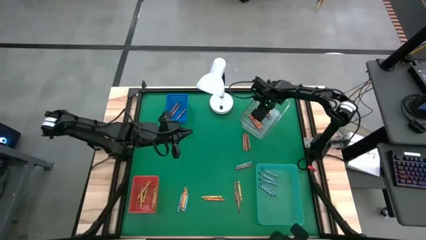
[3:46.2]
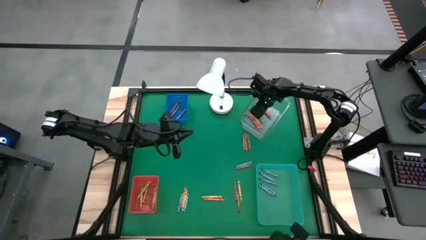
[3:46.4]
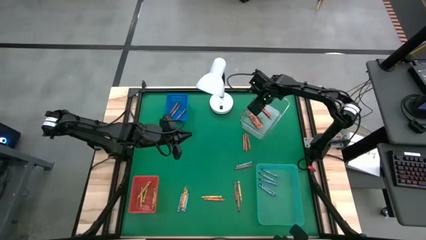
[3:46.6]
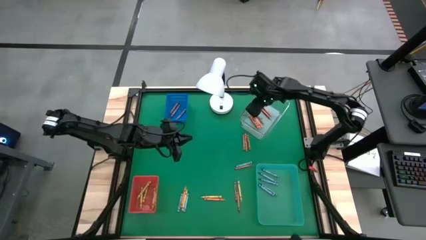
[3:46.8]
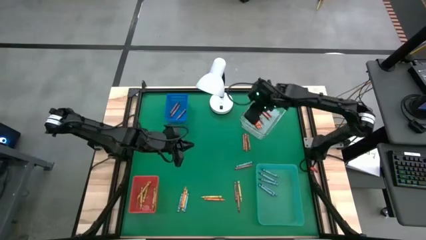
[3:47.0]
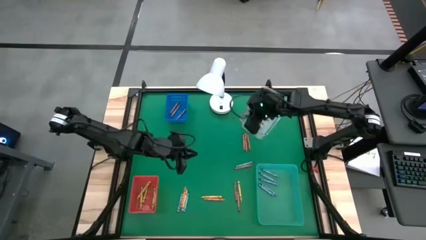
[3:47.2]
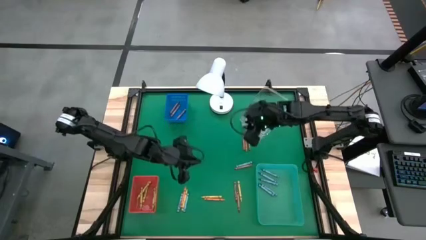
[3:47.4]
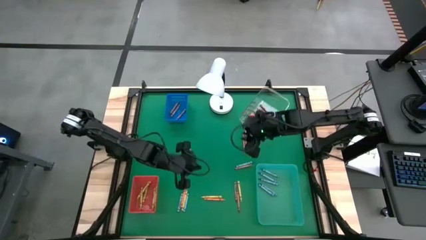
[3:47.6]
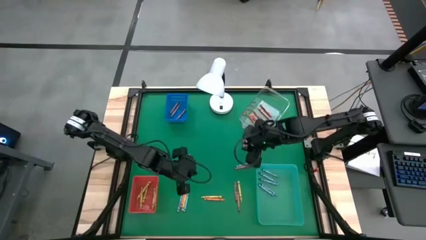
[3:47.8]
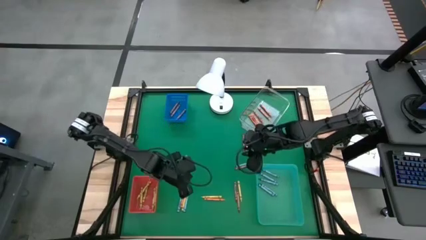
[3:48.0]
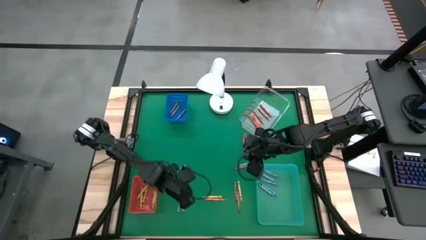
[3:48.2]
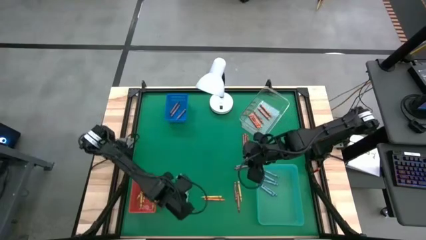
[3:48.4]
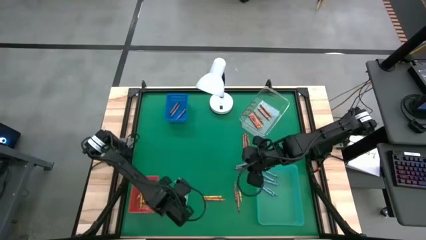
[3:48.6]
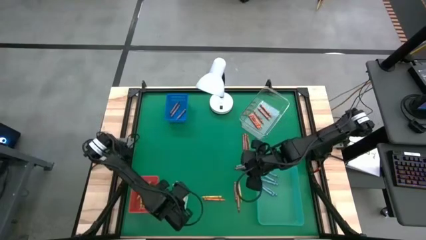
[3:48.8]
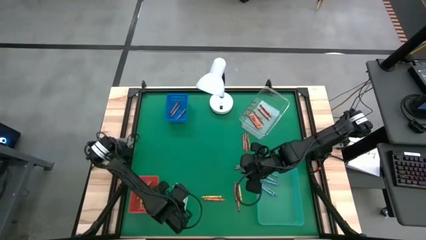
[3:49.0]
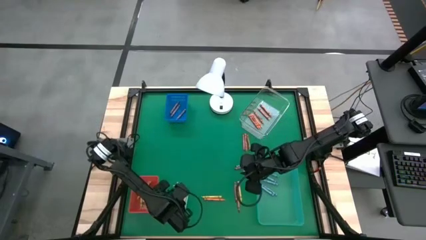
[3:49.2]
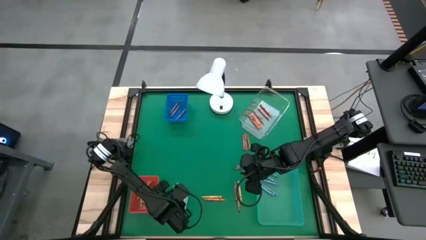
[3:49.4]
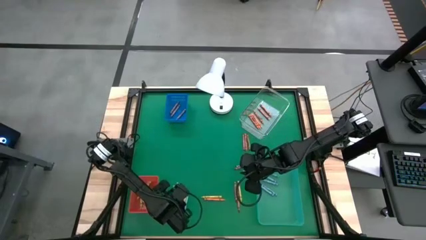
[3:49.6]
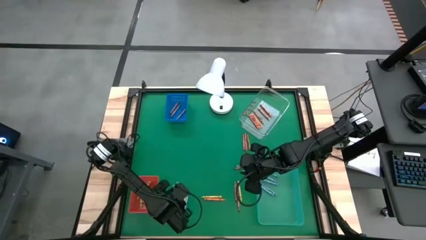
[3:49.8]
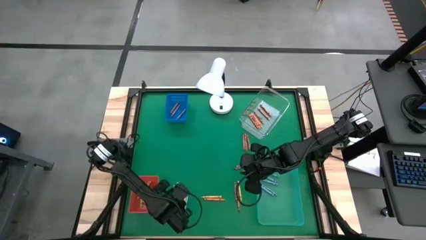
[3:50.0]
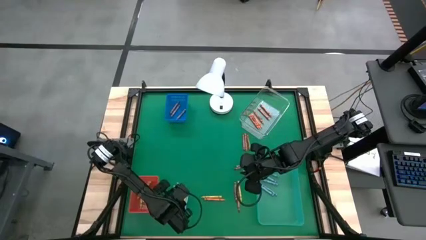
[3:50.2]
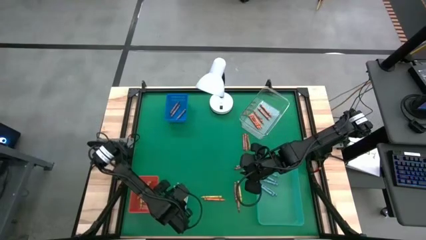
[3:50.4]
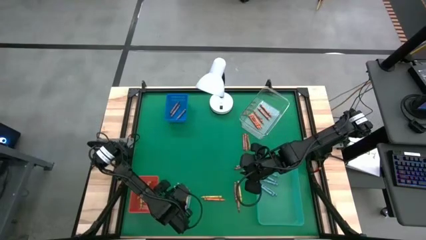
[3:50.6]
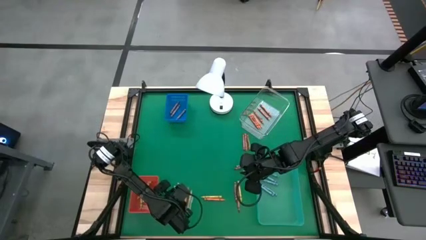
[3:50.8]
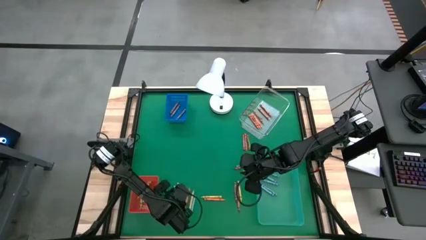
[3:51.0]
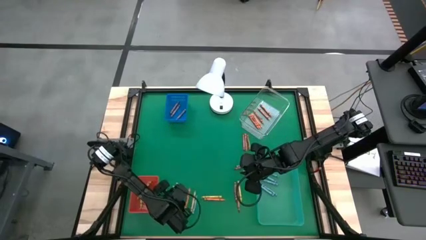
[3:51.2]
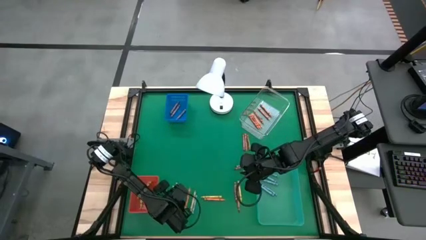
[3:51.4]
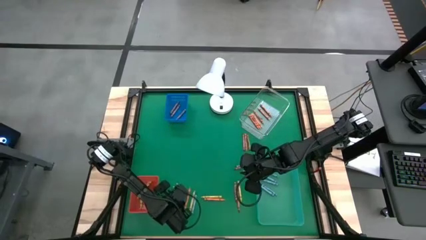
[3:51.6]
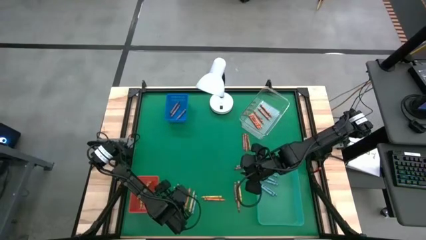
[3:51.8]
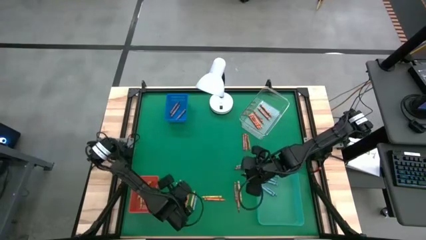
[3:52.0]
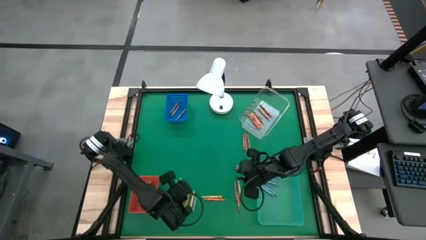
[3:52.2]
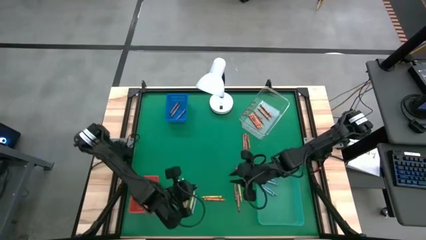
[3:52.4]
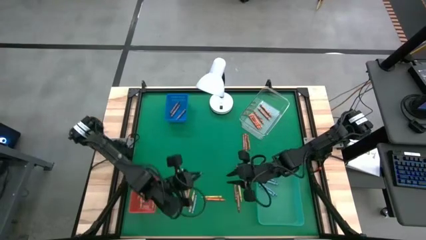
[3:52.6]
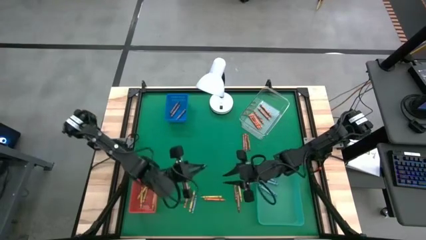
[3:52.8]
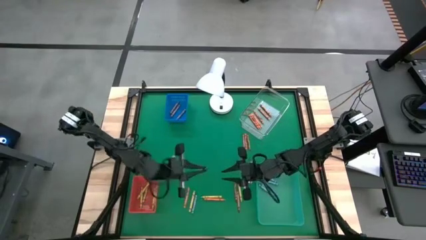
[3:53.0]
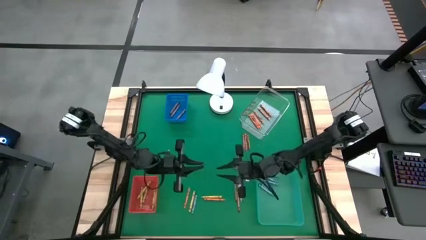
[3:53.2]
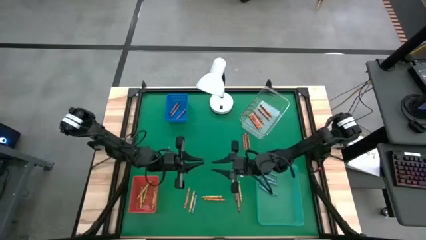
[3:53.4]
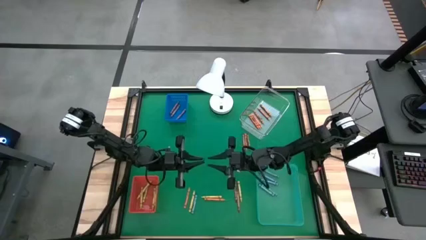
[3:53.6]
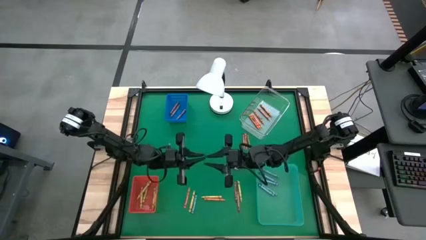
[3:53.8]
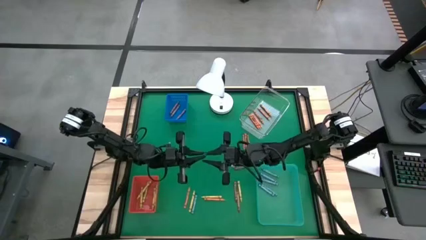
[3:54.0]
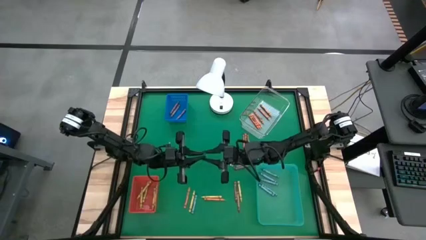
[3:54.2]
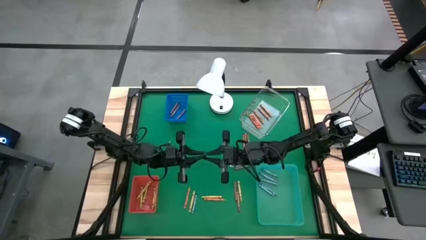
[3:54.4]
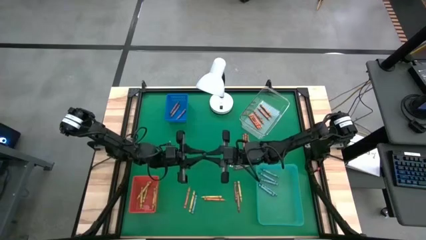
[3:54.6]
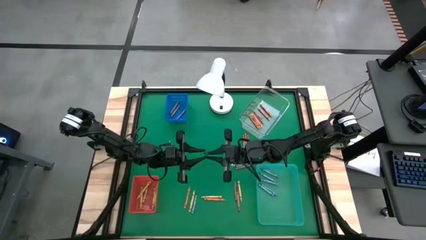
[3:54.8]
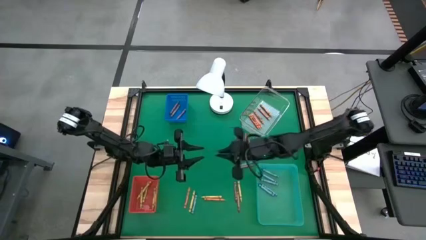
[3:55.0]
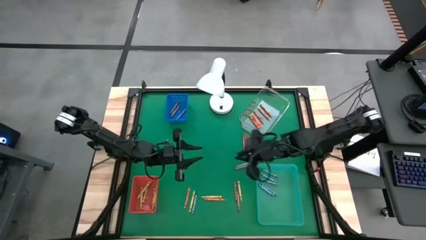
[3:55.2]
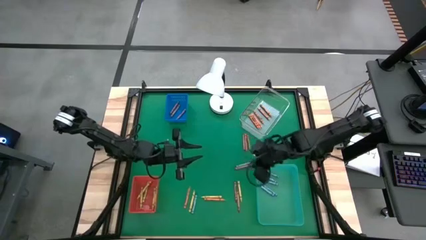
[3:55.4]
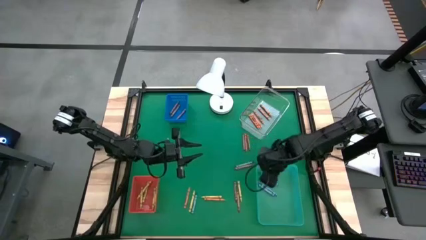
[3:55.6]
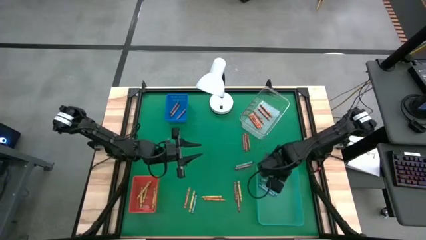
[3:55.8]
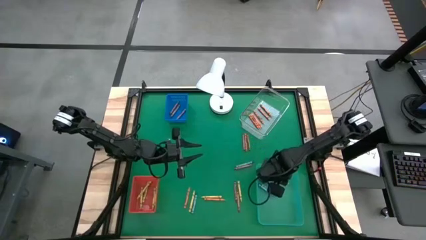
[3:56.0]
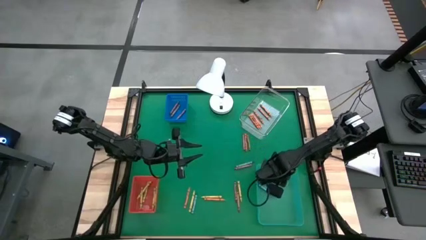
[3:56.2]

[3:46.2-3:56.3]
Task: Sort crayons
Put the blue crayon into the green bin
